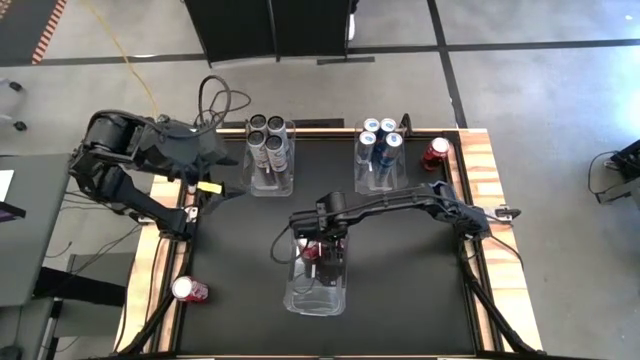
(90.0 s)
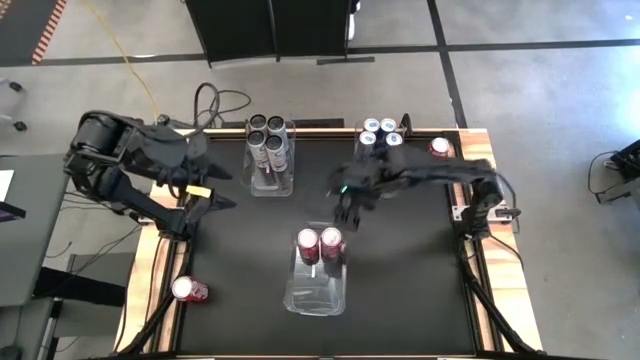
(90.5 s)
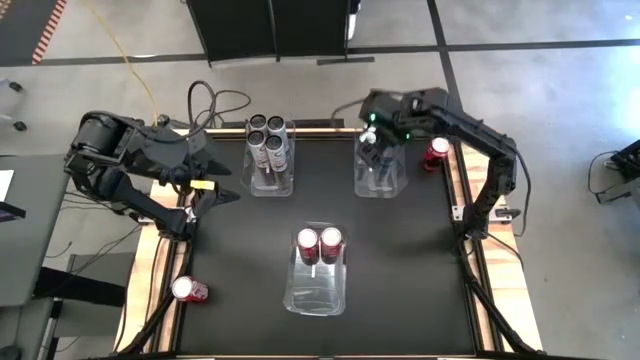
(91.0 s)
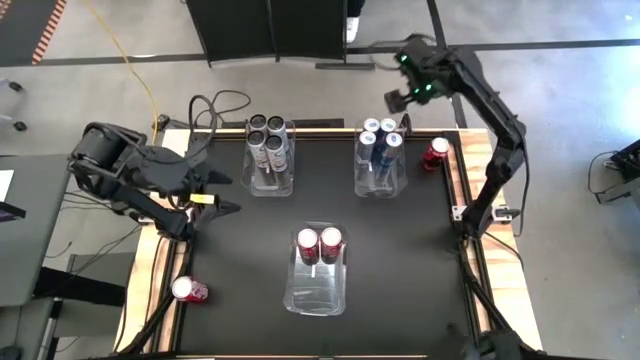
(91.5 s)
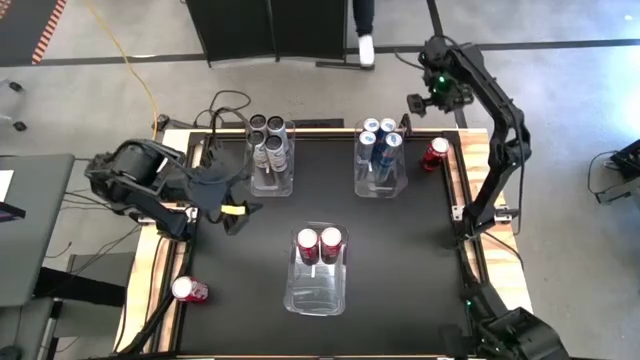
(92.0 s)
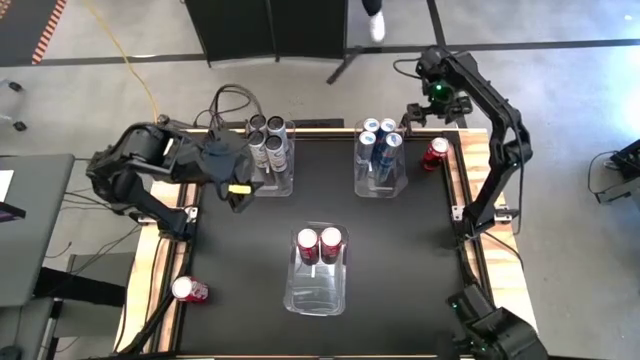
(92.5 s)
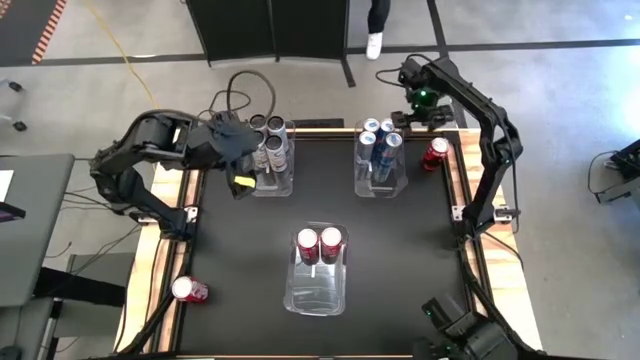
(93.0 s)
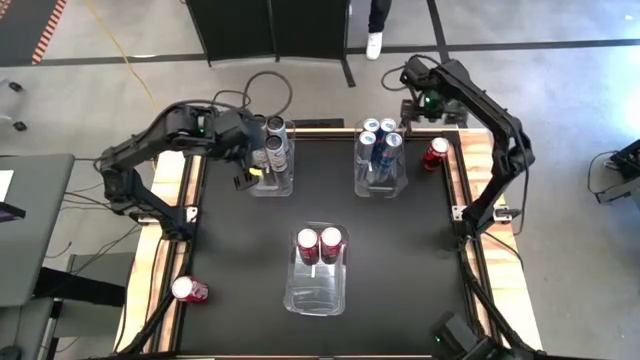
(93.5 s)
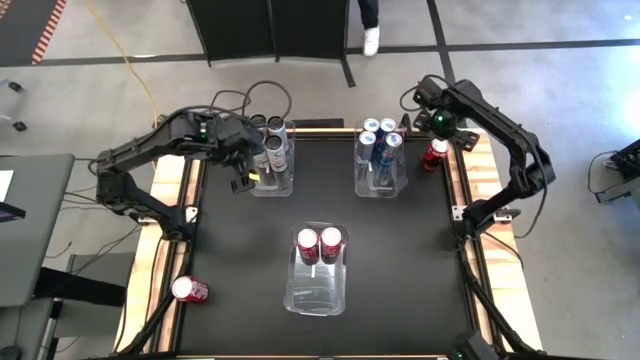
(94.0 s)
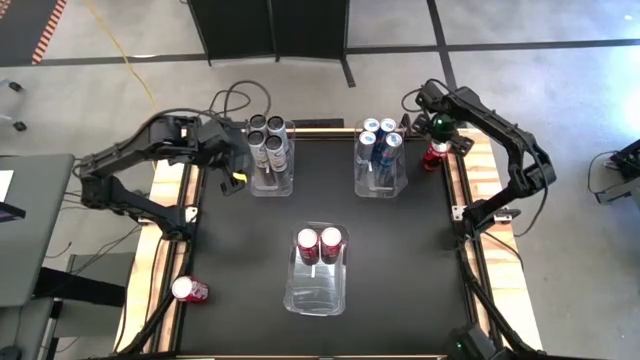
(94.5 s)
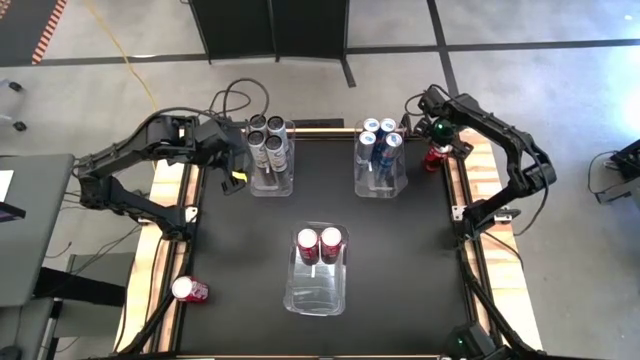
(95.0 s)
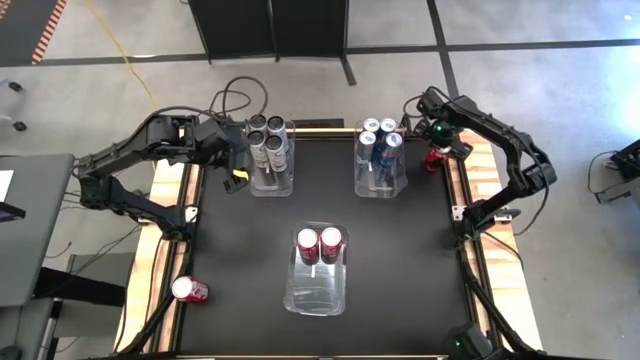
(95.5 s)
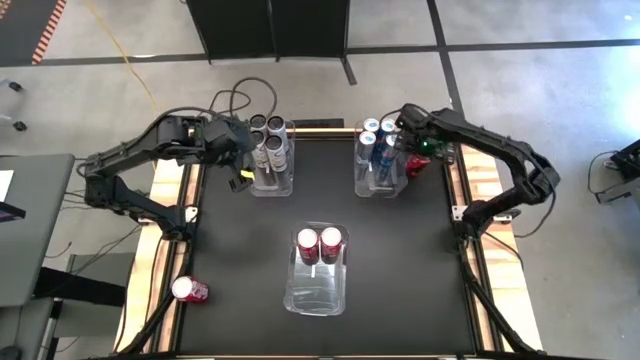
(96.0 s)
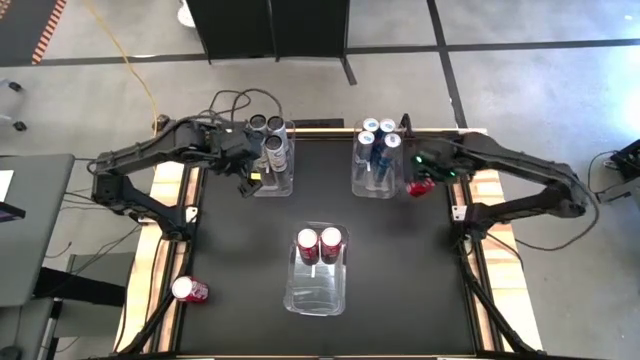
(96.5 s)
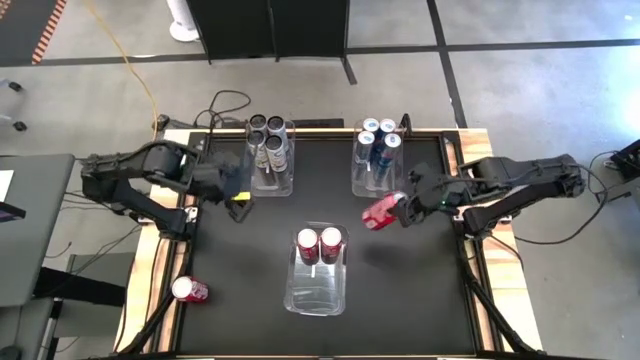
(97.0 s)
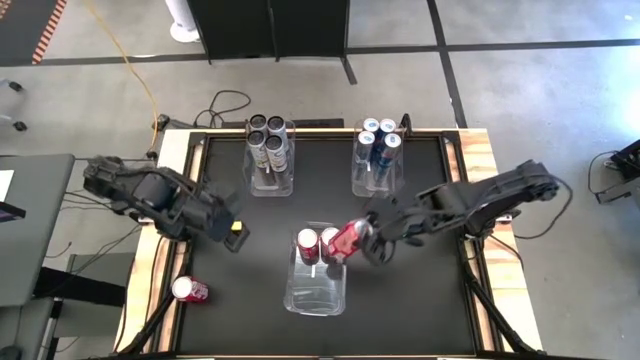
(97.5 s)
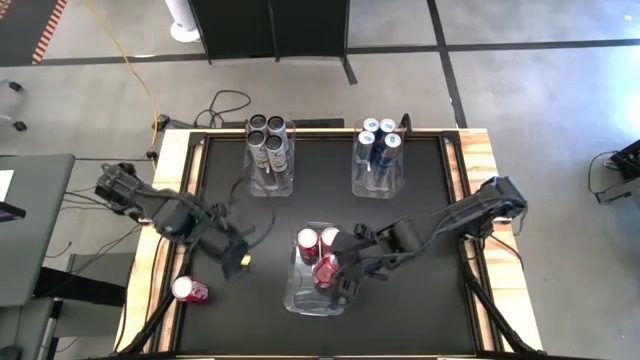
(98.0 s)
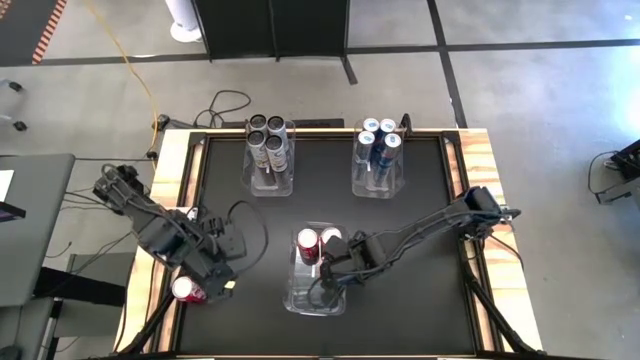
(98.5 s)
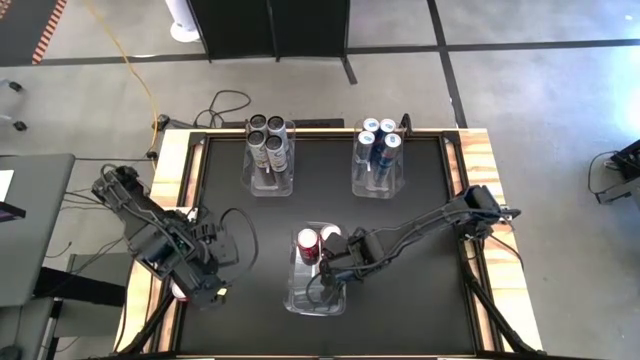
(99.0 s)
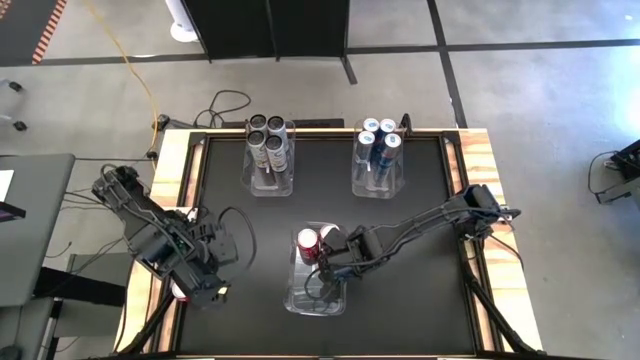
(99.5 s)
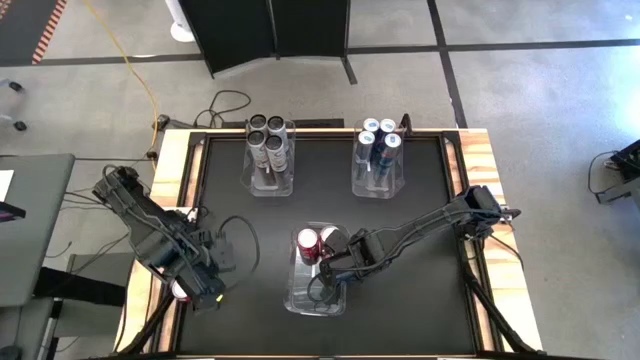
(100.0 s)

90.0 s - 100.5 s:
Task: Sort soda cans
Put the top red soda can into the bottom transparent bin

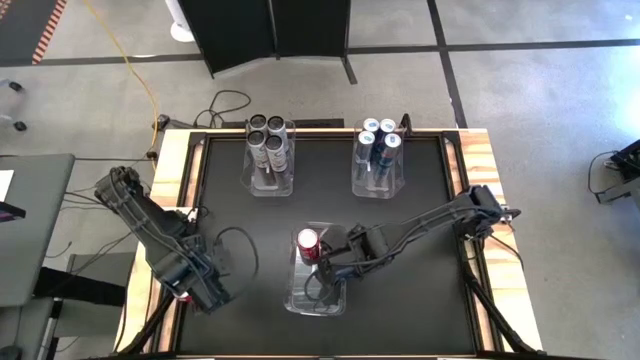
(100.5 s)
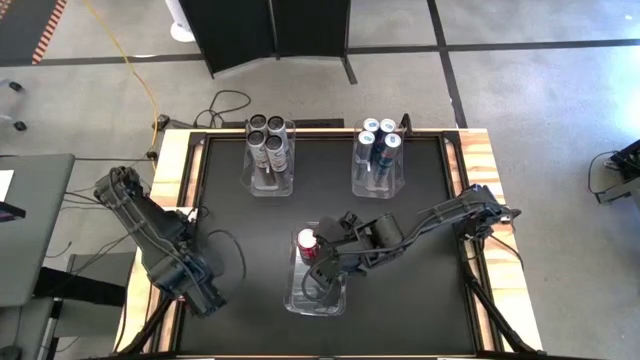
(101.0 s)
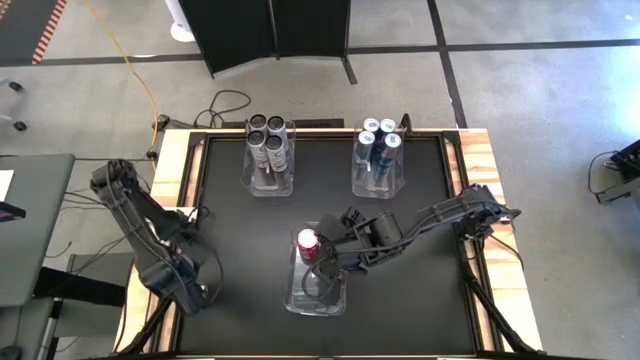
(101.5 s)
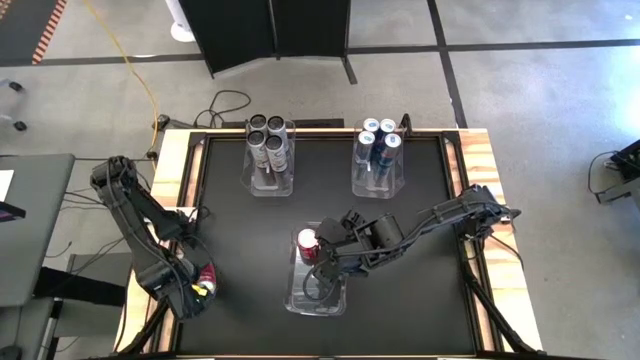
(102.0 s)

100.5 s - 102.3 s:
Put the red soda can into the bottom transparent bin

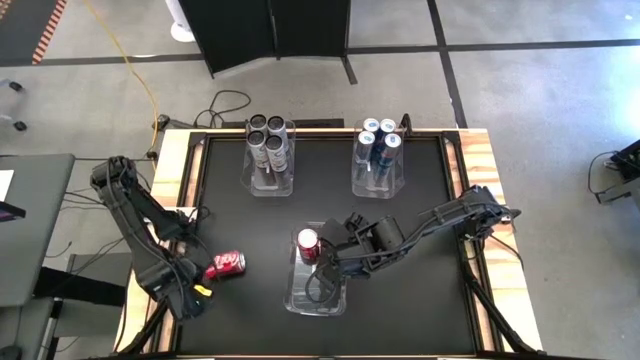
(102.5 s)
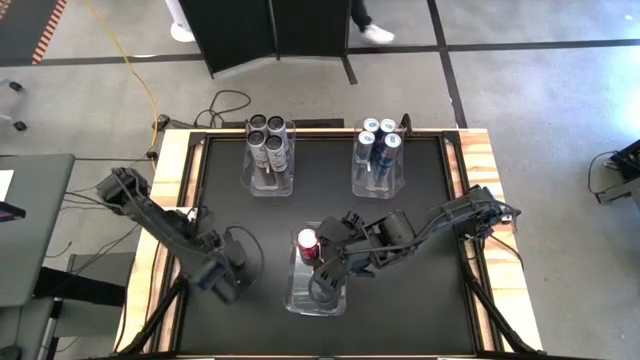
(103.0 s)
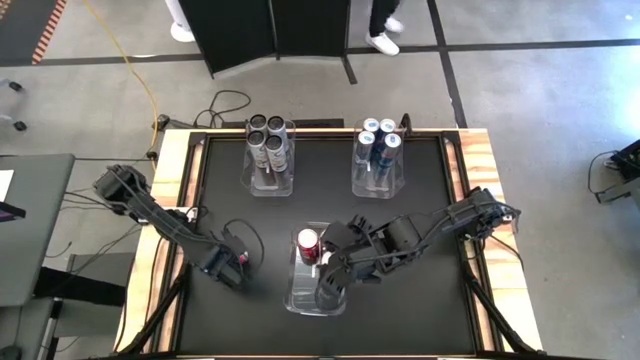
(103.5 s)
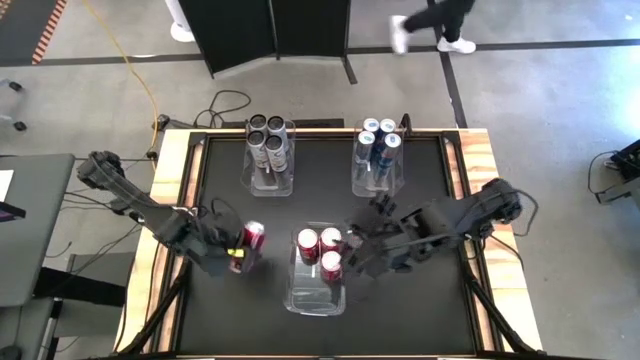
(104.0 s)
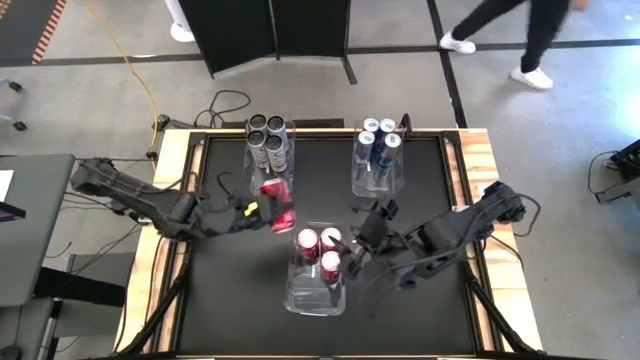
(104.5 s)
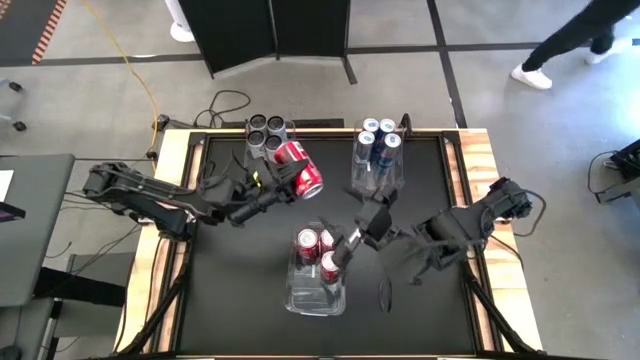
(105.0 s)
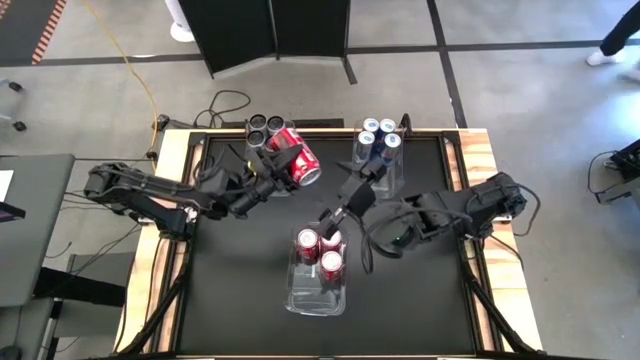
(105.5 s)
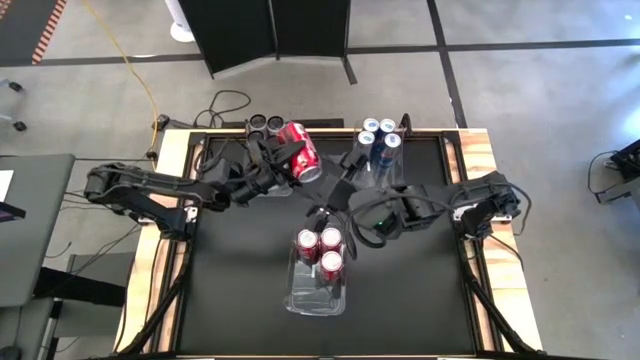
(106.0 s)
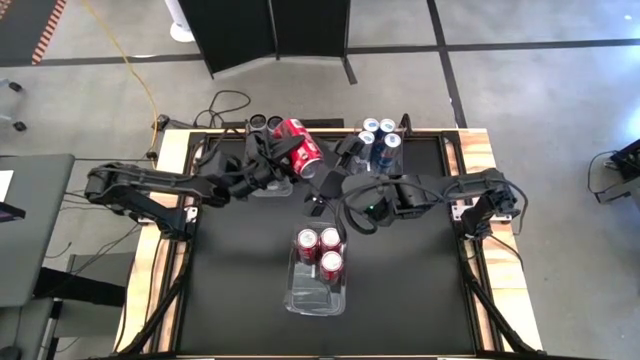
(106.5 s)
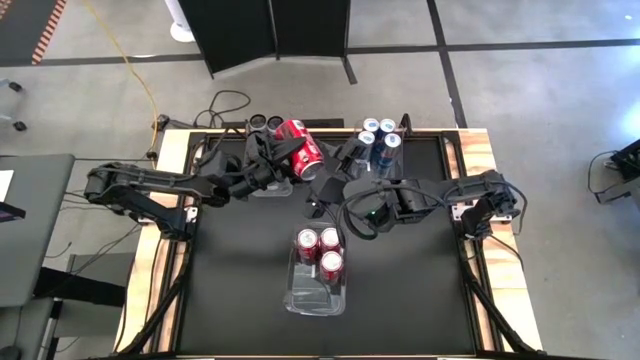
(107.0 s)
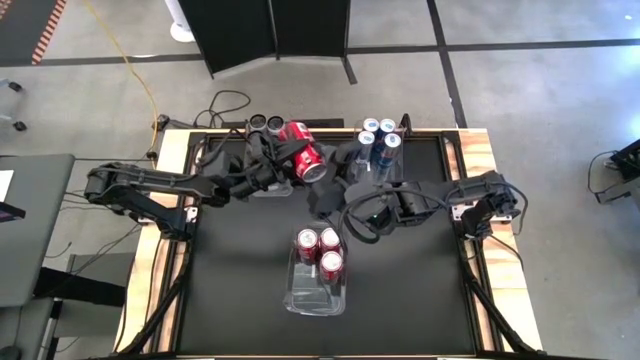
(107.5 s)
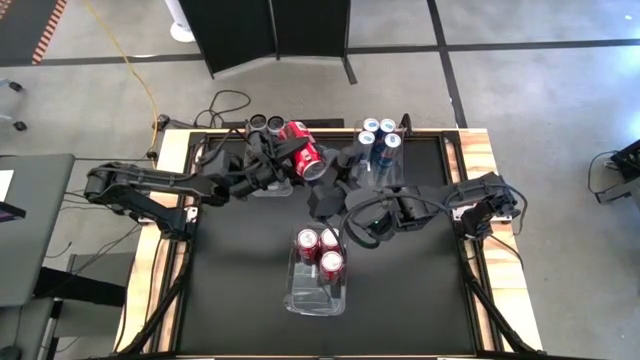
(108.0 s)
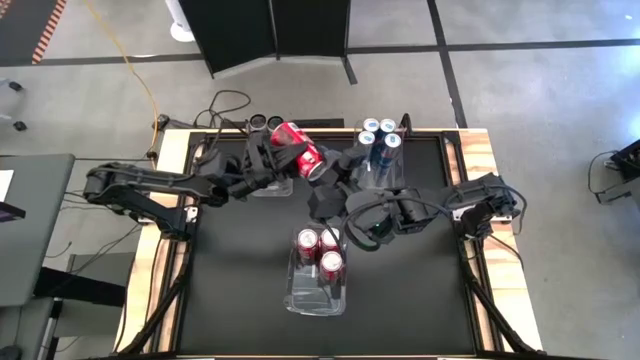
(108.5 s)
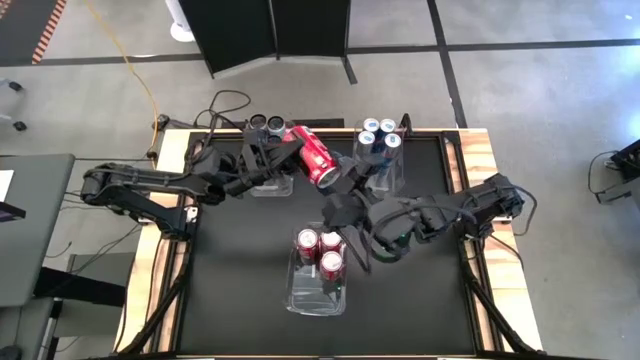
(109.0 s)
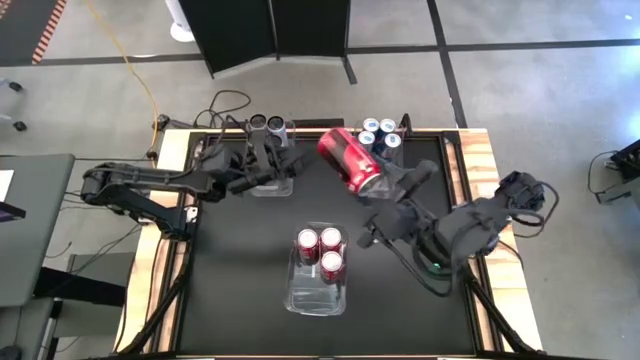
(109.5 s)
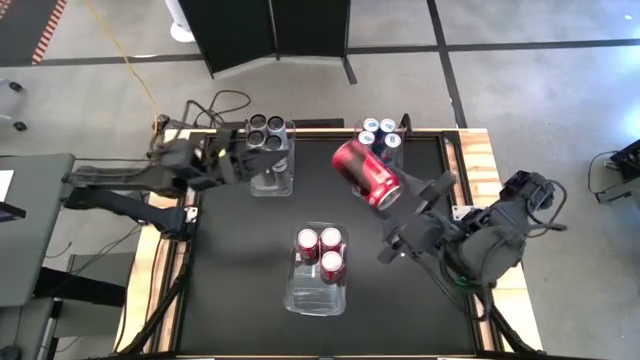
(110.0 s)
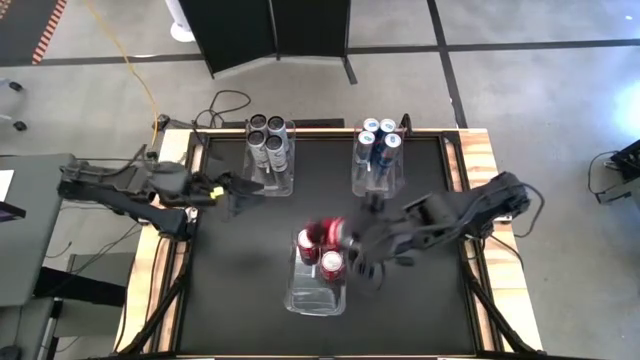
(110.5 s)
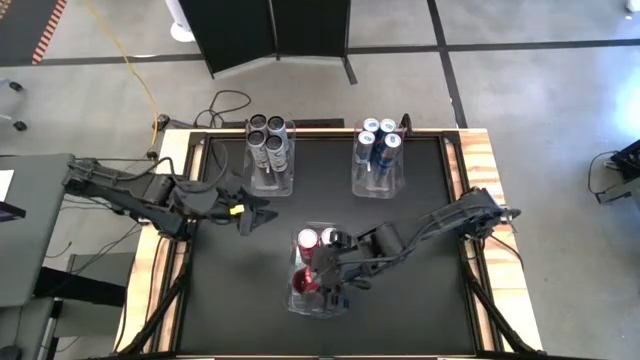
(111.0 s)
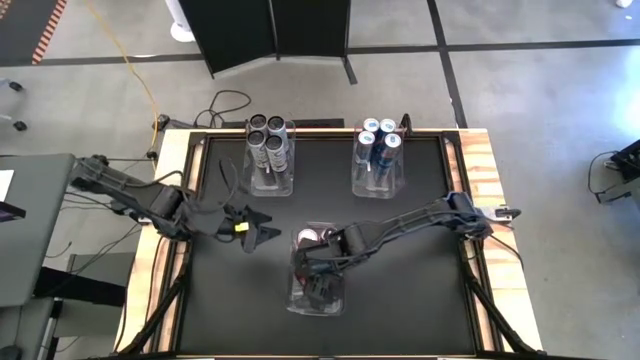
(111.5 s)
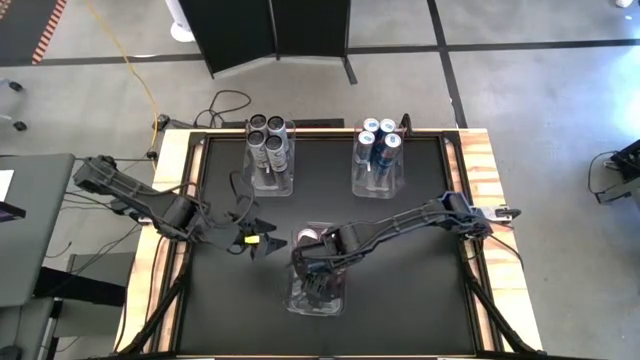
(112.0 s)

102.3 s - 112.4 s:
Put the red soda can into the bottom transparent bin
